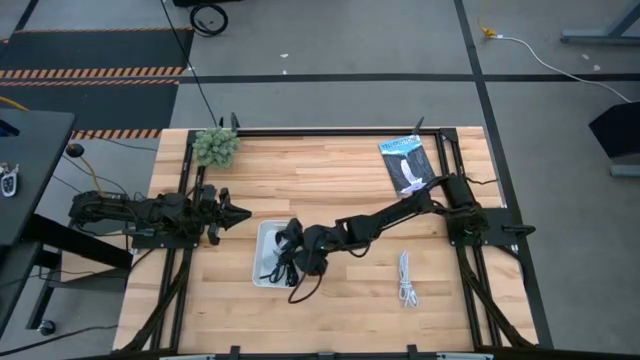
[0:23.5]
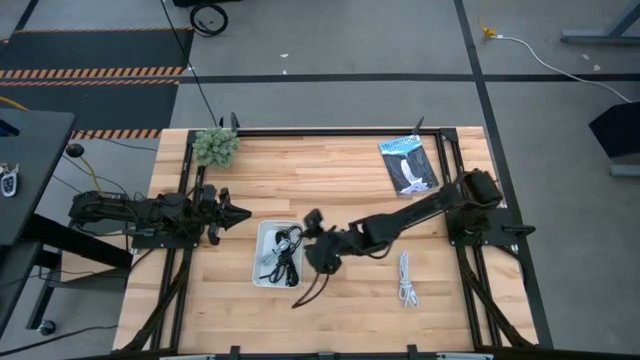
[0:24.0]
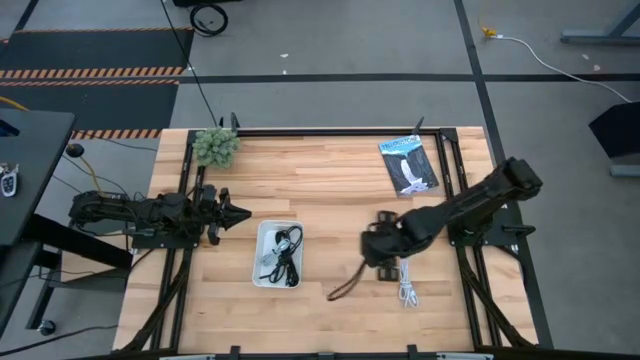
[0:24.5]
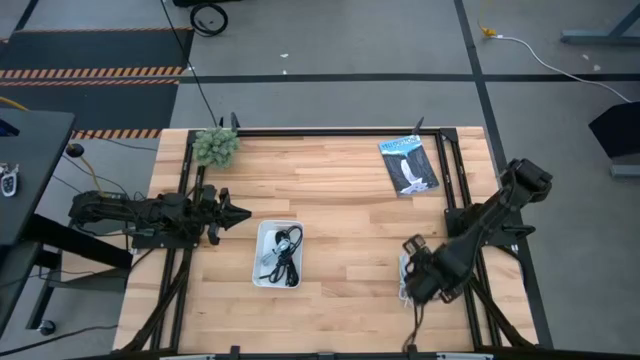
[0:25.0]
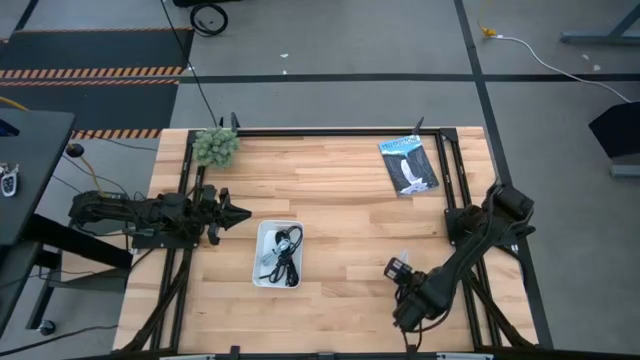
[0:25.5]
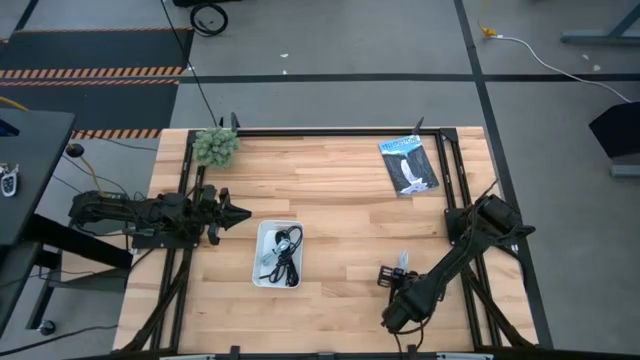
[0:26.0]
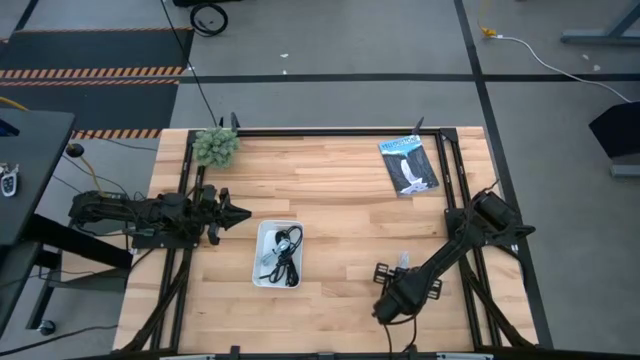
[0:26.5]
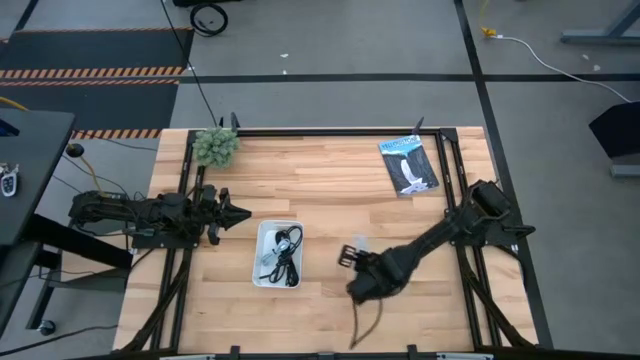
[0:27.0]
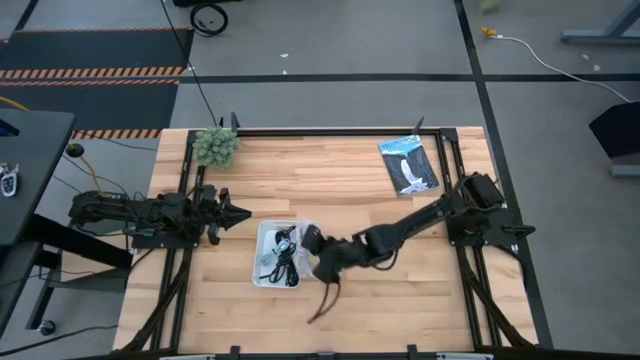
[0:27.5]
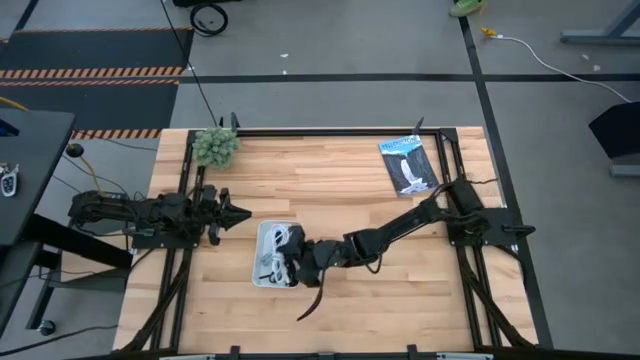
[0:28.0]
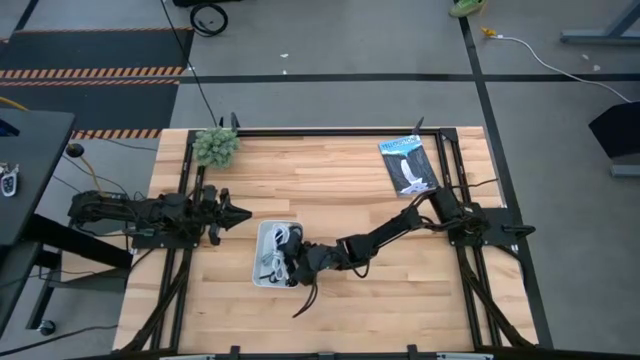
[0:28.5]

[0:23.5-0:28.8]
Task: Pick and place USB-C Cables
Put the white charger cable into the white bin

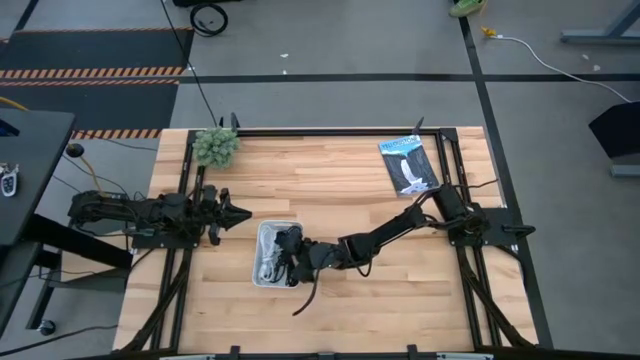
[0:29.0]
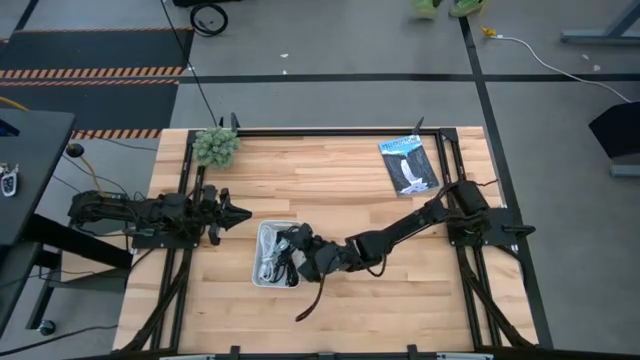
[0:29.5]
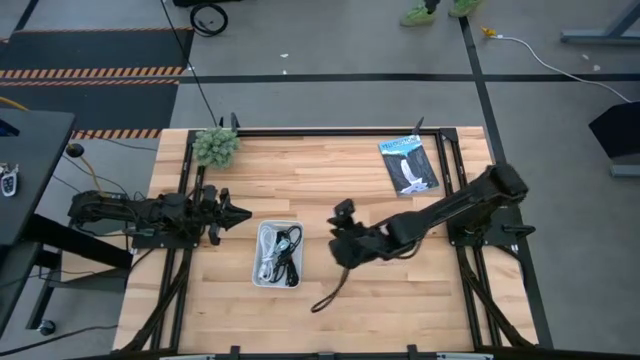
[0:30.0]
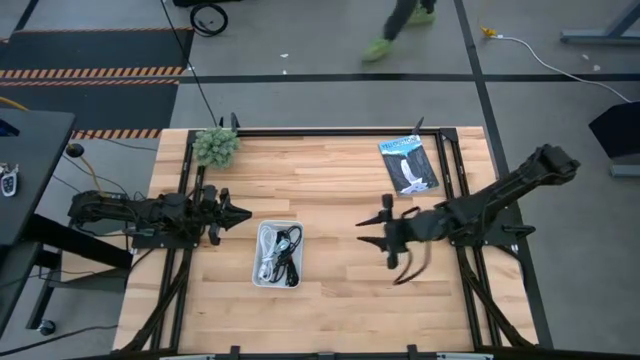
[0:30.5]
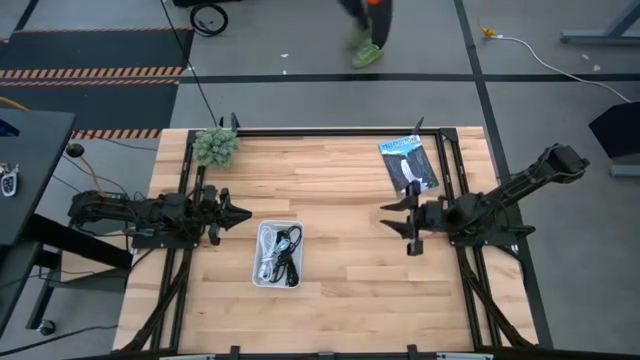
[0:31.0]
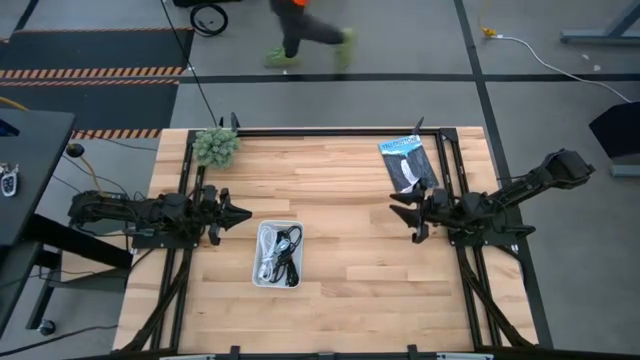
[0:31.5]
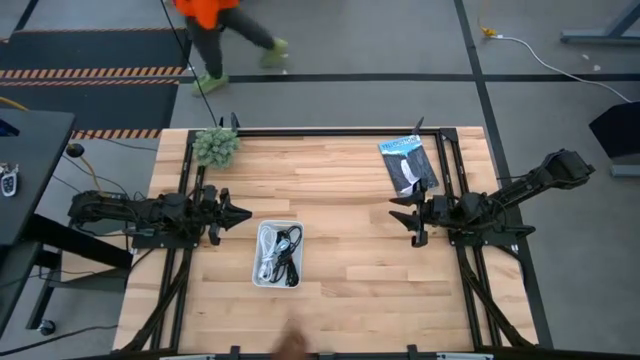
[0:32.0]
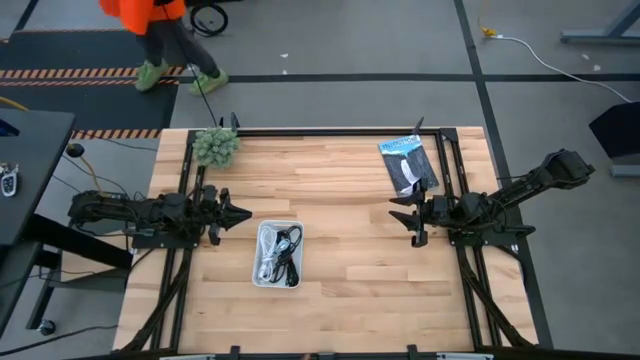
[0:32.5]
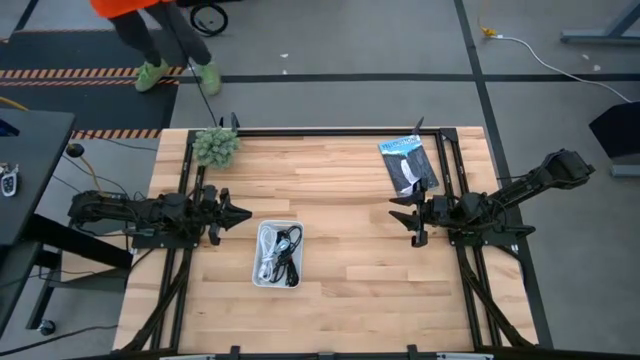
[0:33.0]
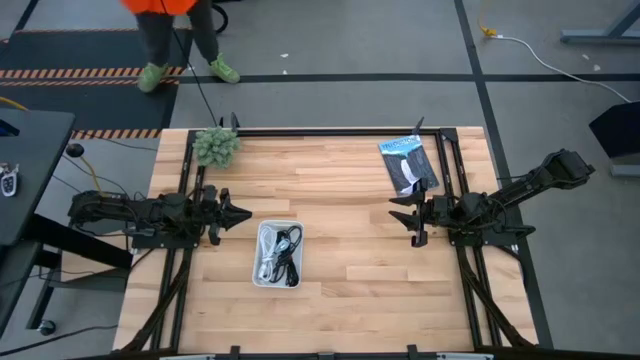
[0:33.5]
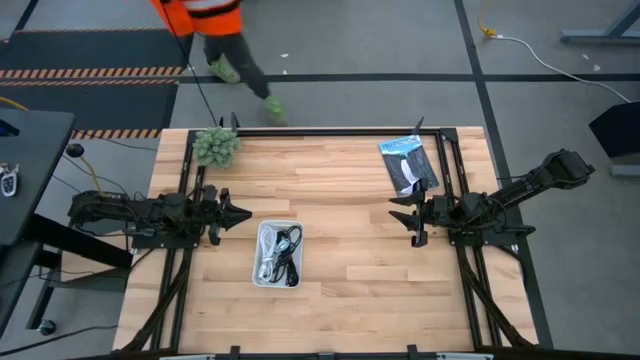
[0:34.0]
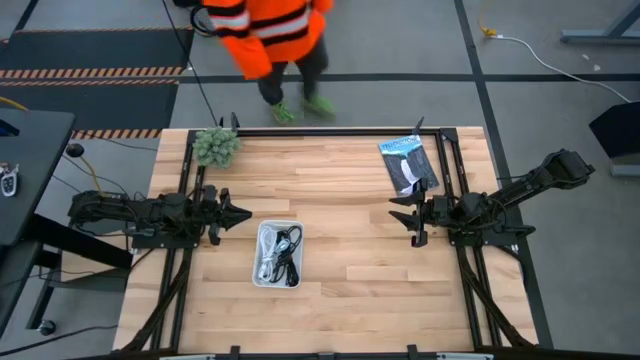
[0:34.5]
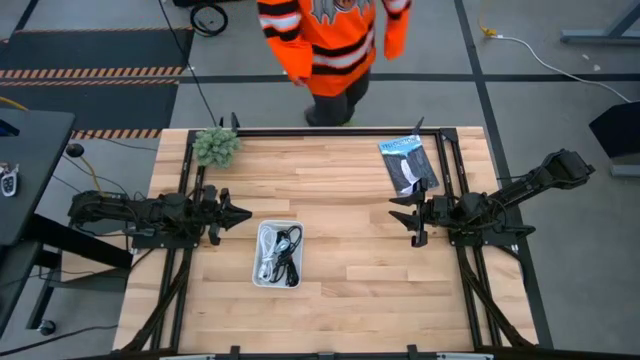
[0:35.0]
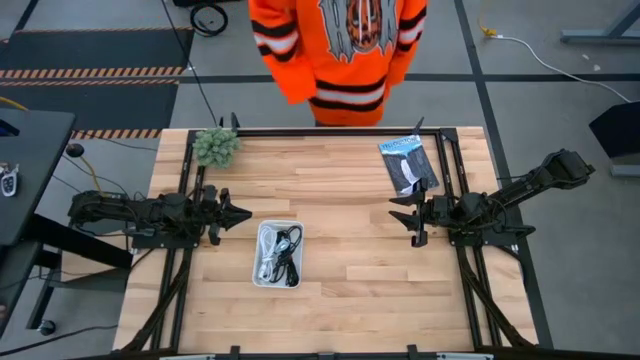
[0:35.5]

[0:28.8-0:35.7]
Return to Home Position

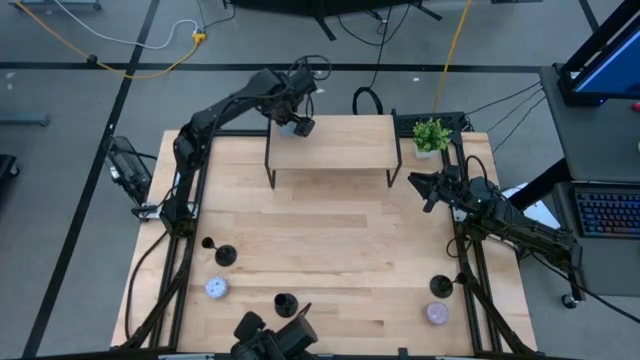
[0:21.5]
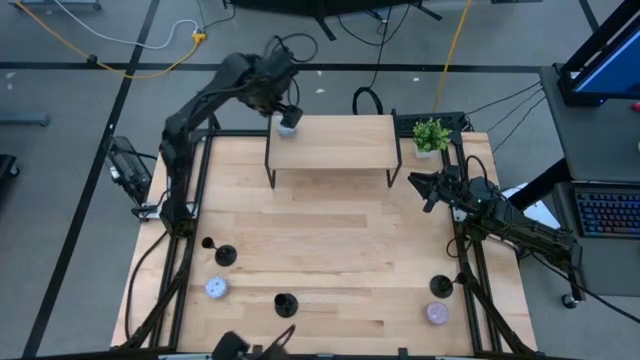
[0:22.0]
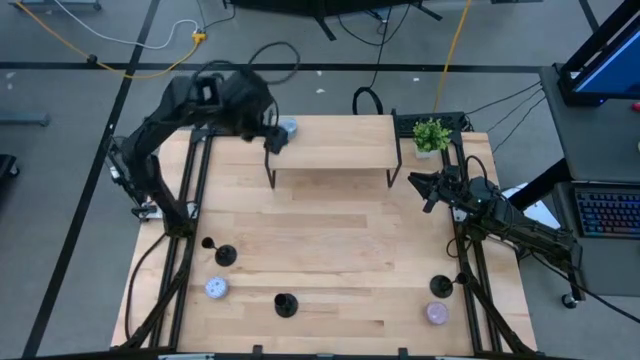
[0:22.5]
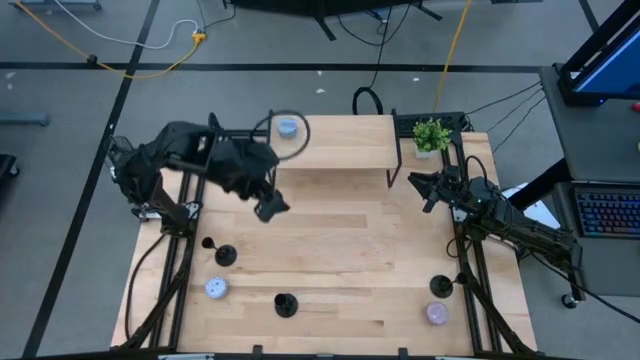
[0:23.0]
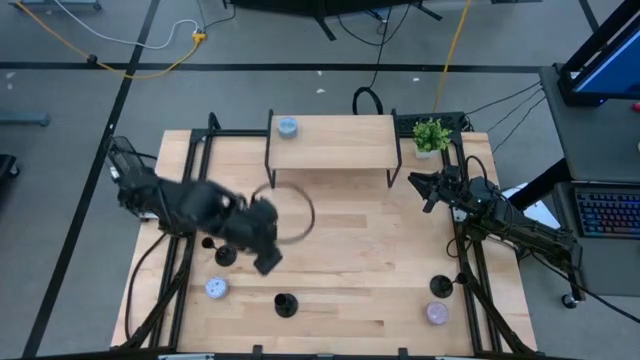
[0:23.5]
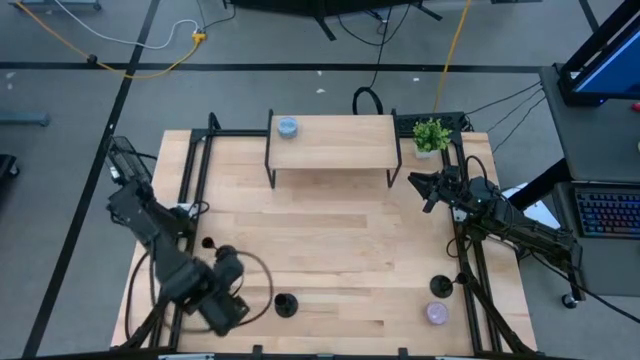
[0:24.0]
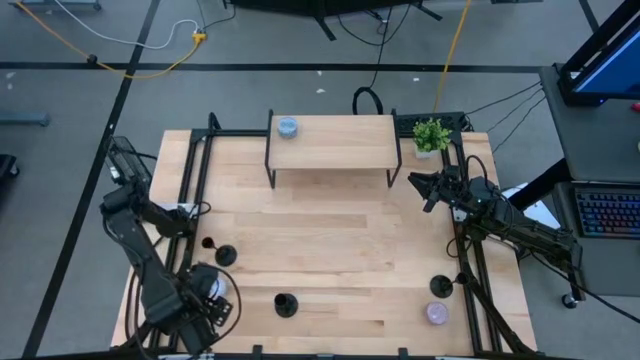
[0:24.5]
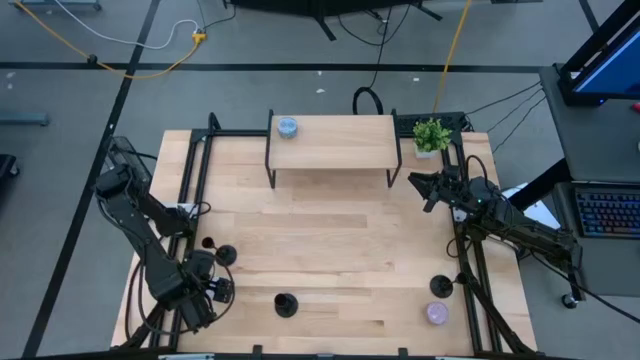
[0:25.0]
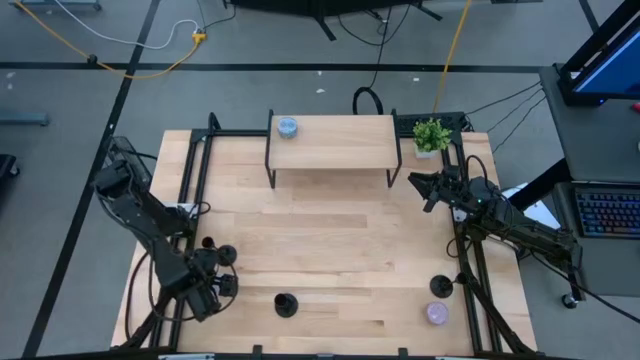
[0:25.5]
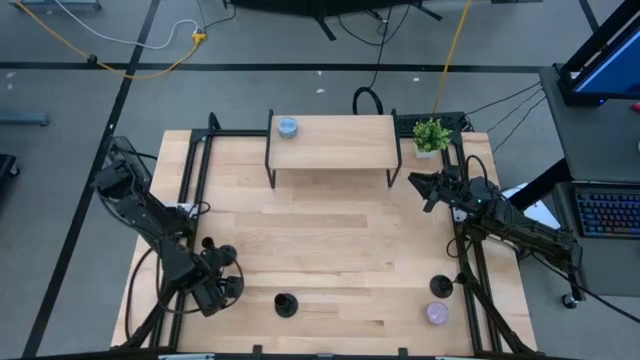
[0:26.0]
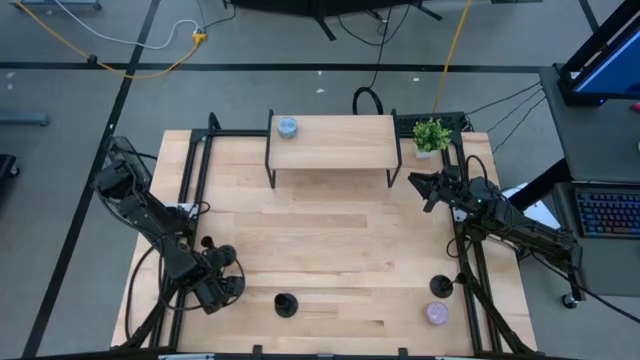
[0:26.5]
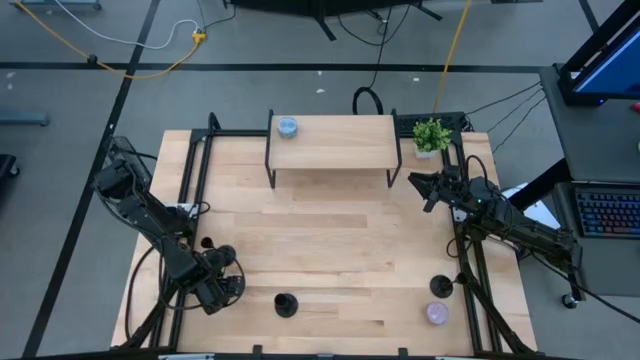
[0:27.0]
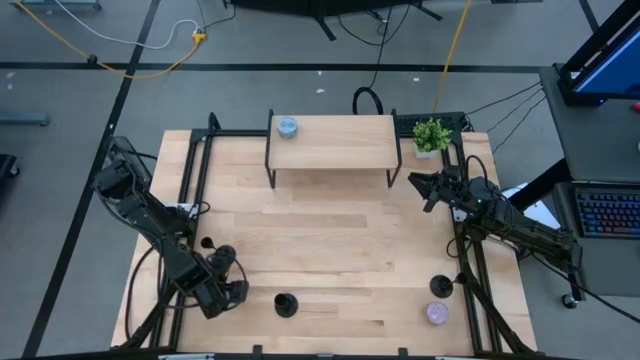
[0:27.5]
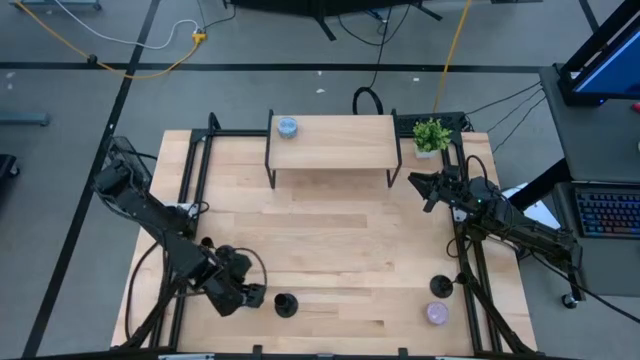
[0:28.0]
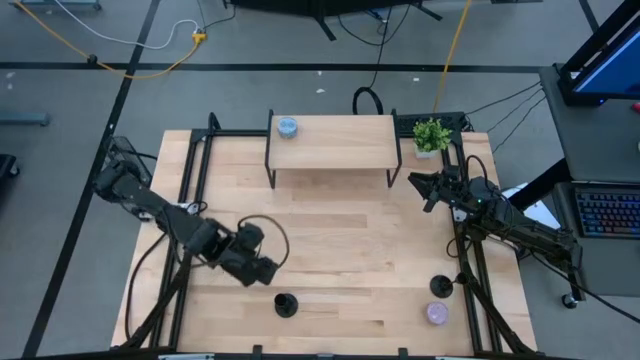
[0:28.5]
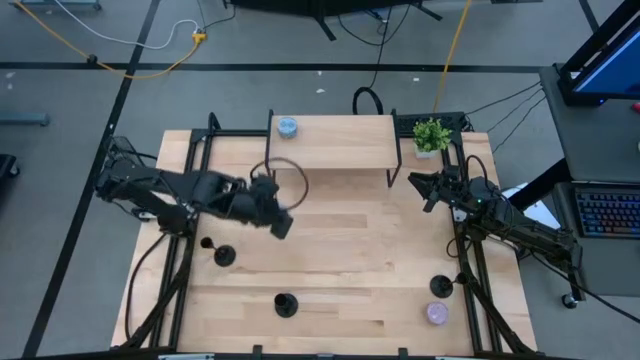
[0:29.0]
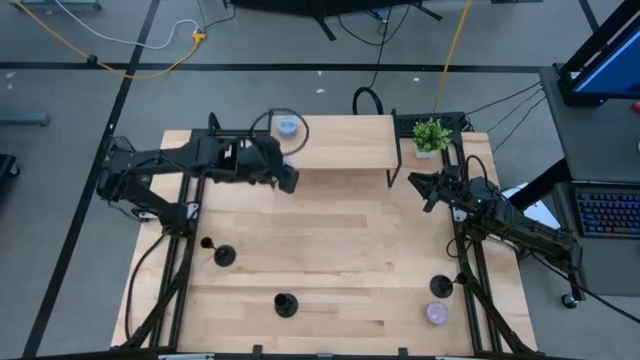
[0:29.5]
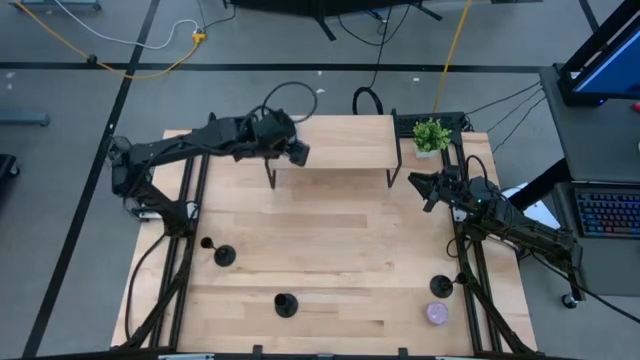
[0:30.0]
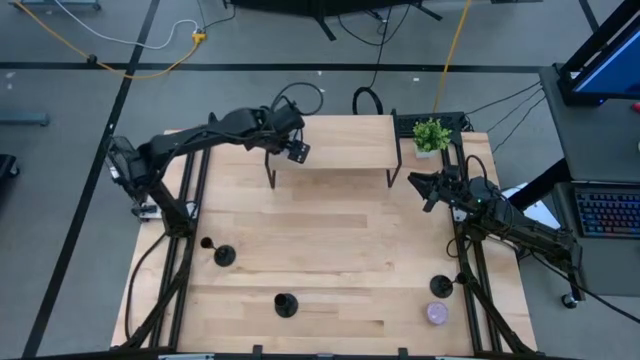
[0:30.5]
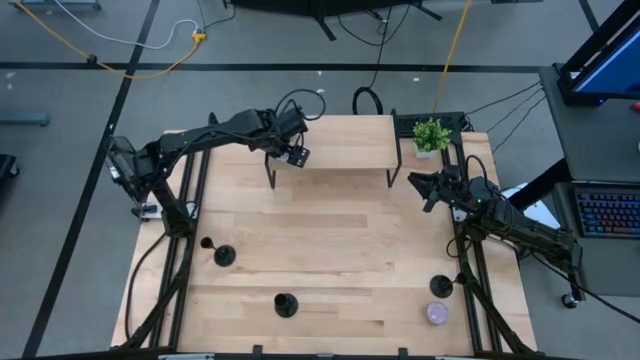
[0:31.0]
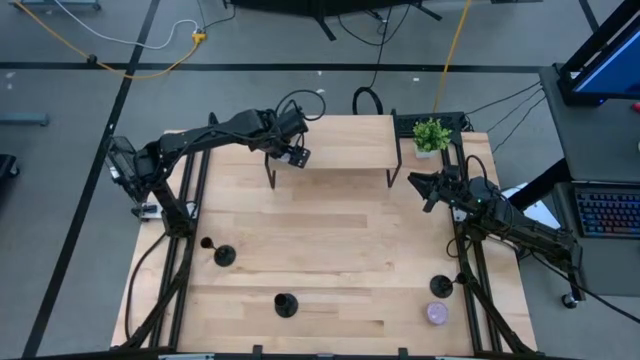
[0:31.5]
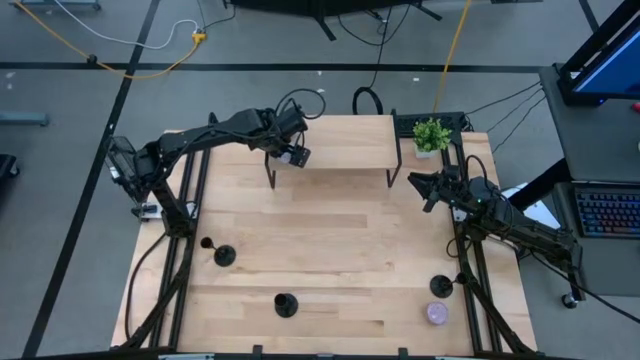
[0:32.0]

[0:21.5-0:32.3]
Task: Pick & Place candle stick holders
Put the white scented candle on the shelf
